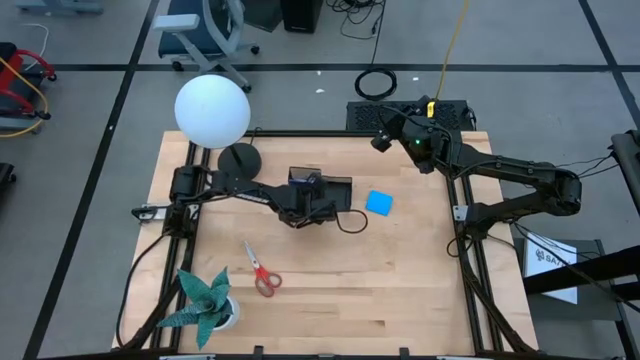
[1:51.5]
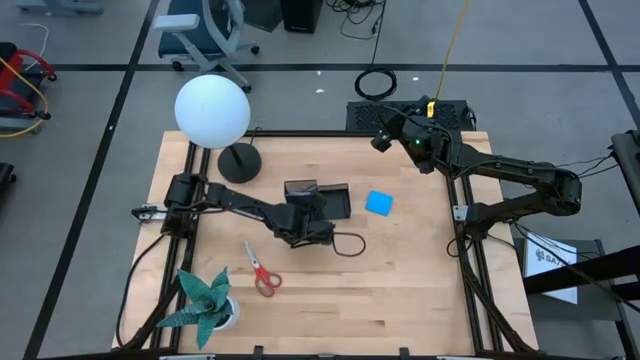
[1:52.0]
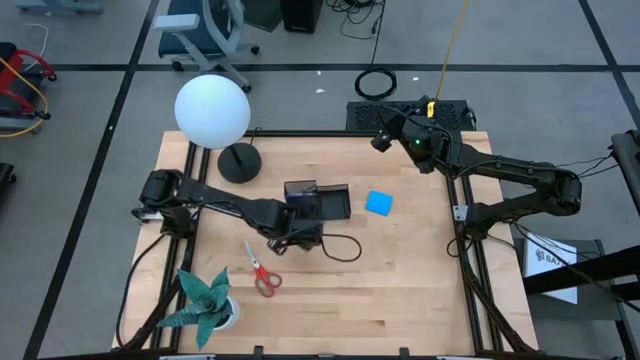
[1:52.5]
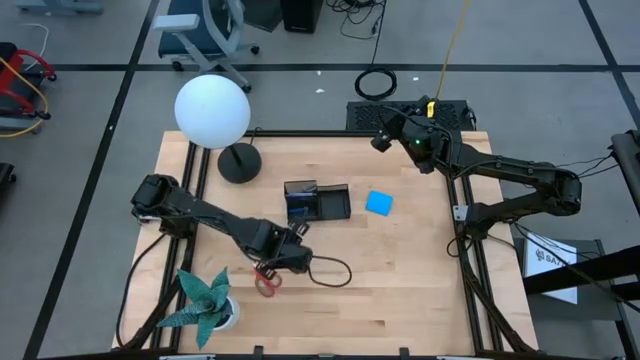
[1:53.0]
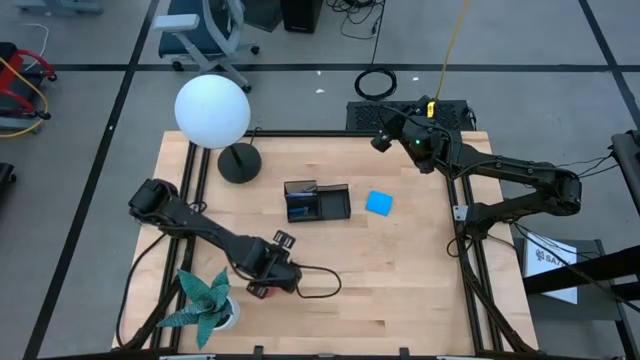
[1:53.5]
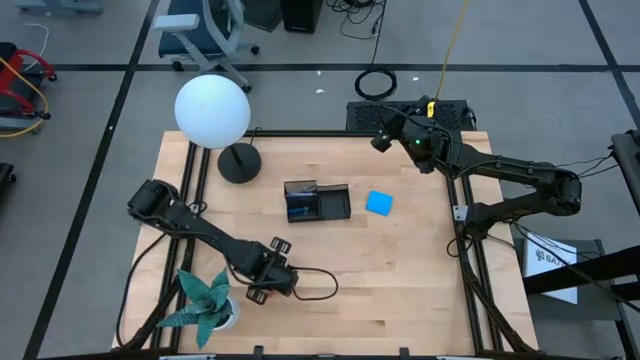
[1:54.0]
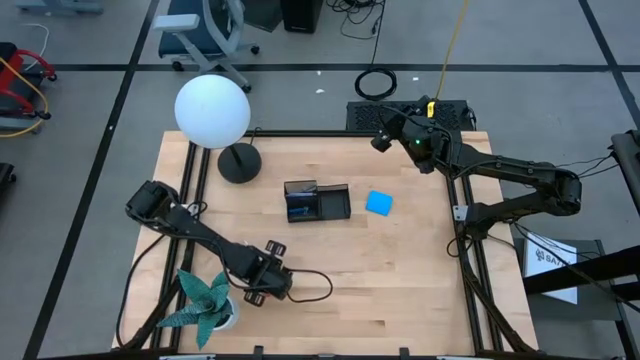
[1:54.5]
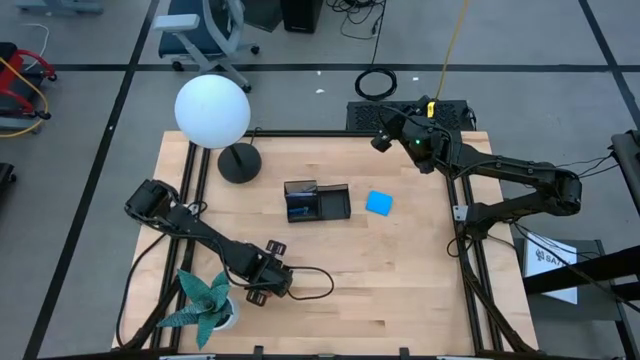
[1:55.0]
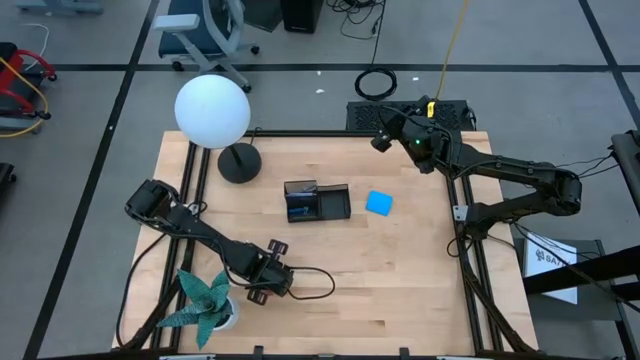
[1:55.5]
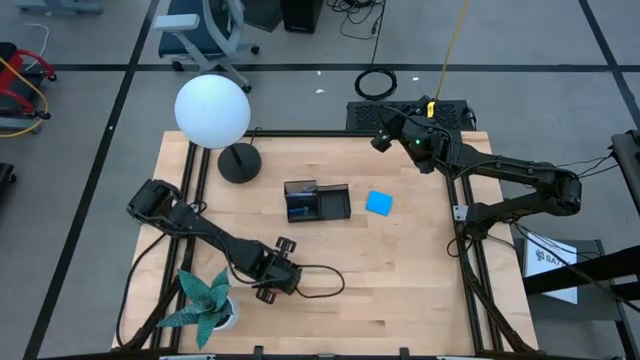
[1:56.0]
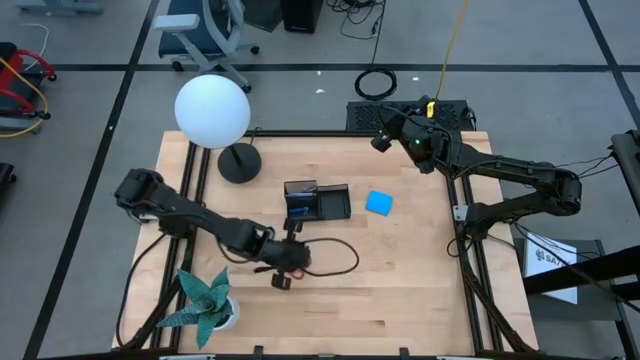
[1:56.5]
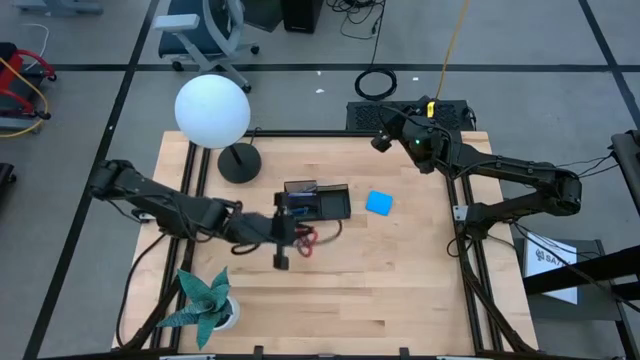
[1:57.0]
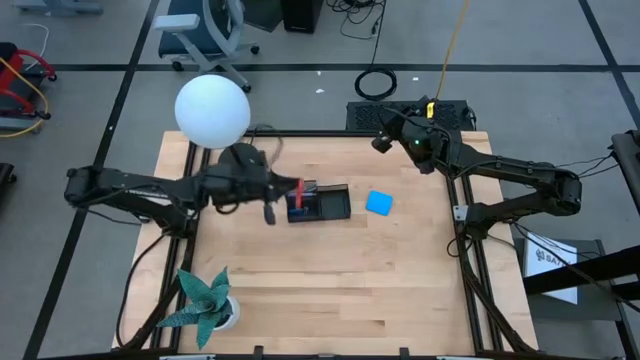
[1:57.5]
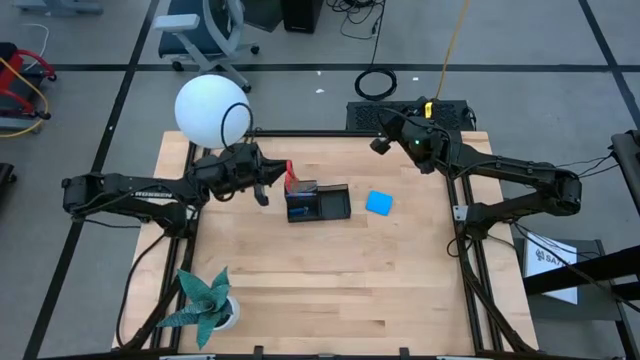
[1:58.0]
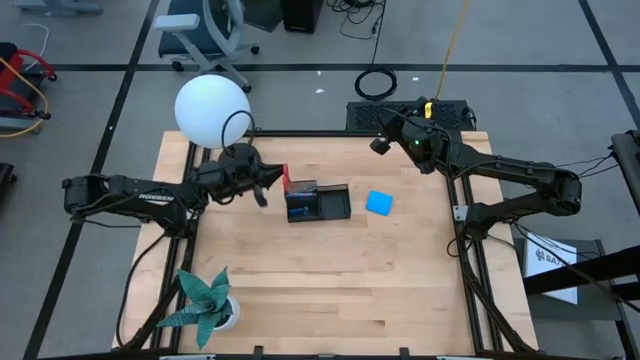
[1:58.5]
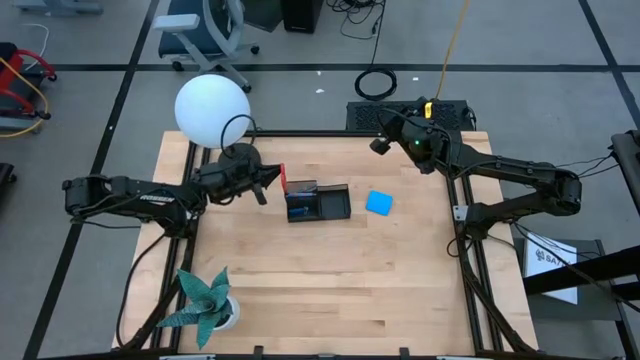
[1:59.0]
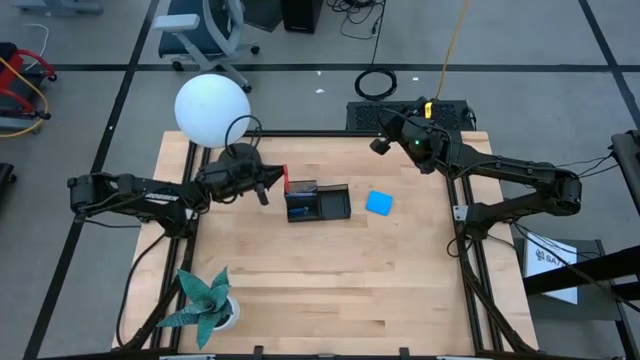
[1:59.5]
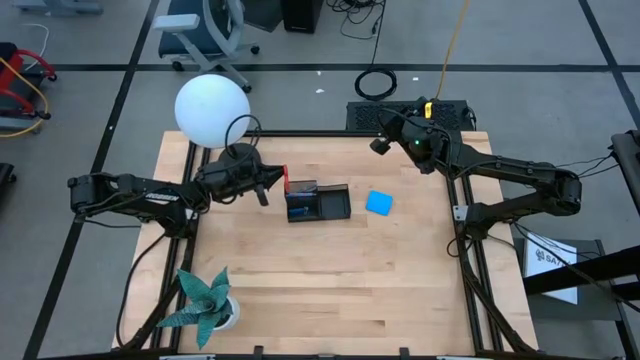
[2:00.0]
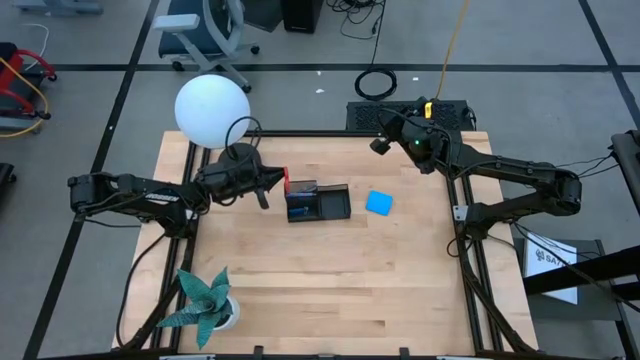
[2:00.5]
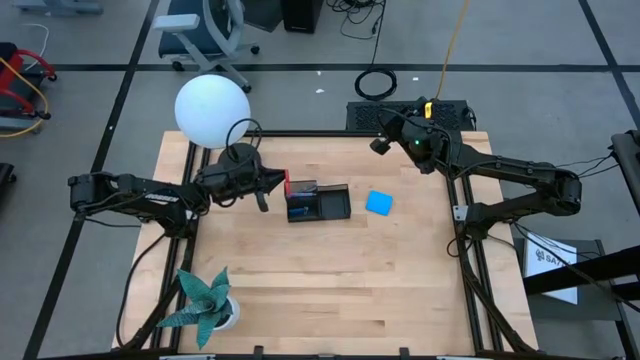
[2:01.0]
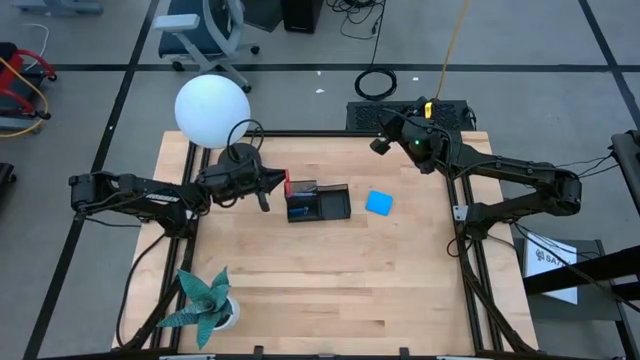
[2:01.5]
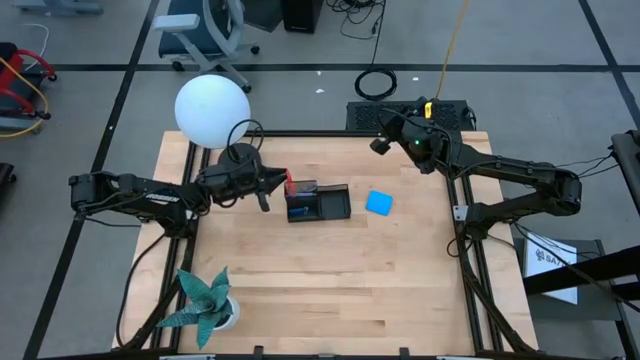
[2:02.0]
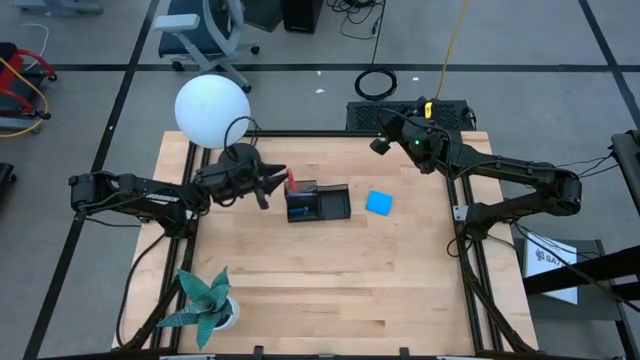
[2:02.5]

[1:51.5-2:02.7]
Task: Pick and place office supplies into organizer
Put the red scissors into the black desk organizer

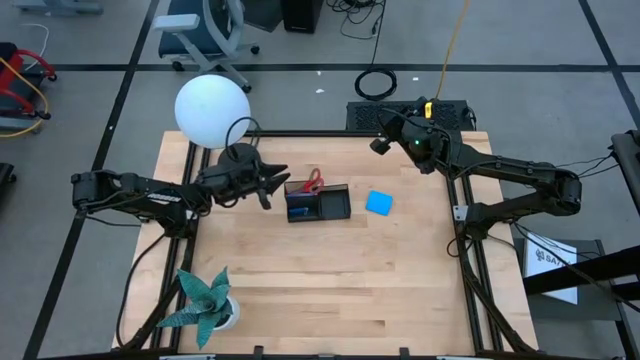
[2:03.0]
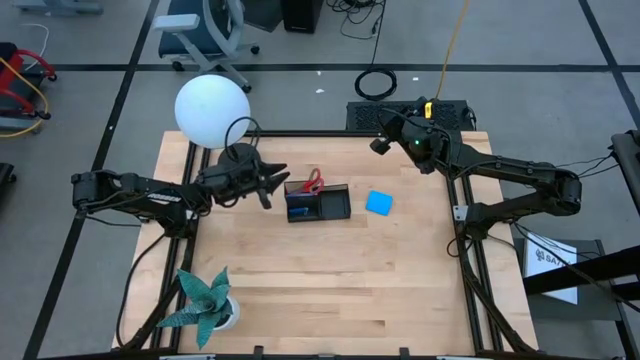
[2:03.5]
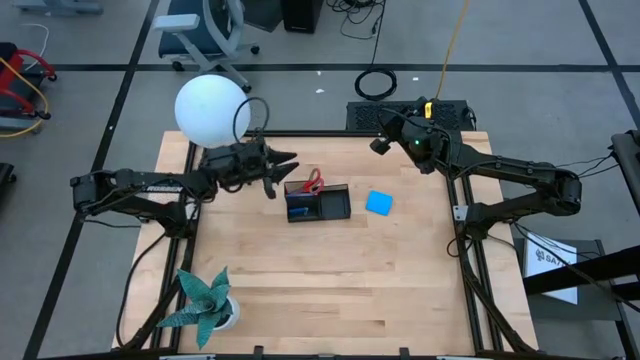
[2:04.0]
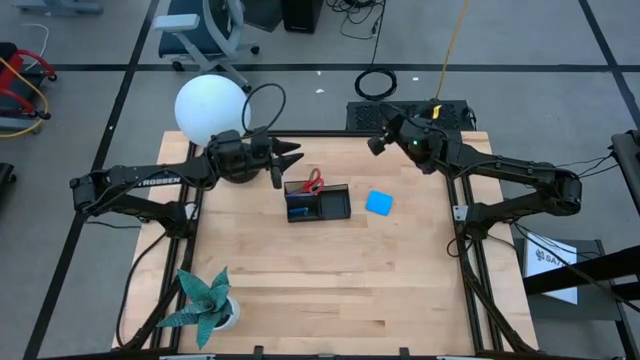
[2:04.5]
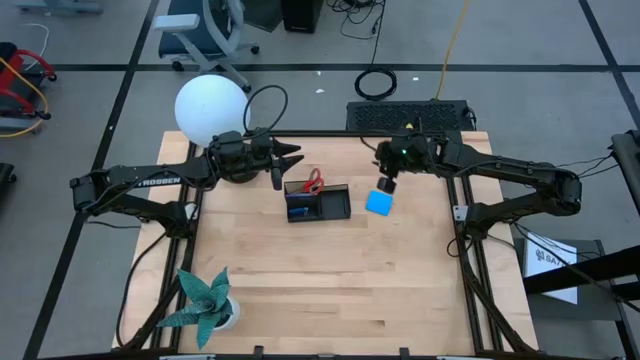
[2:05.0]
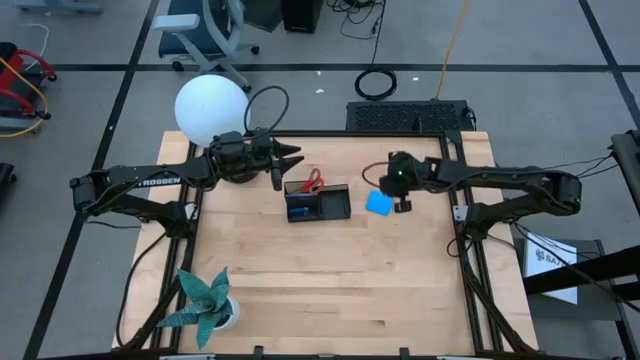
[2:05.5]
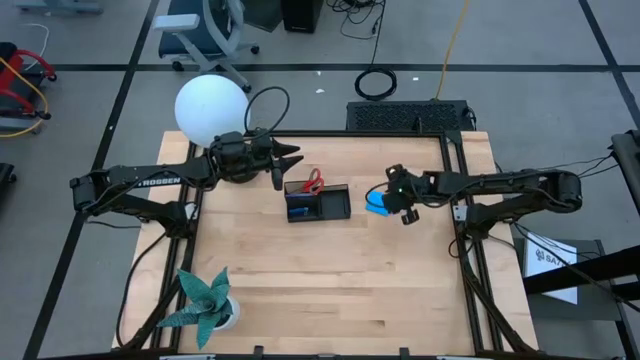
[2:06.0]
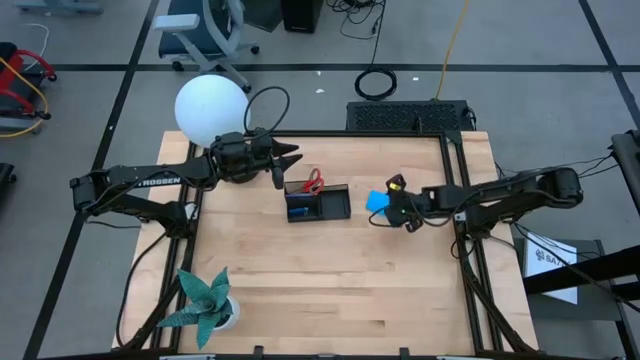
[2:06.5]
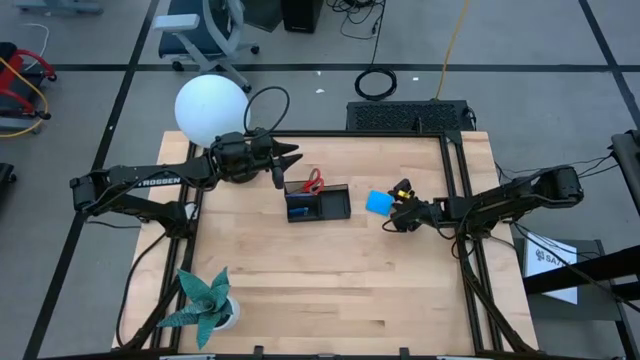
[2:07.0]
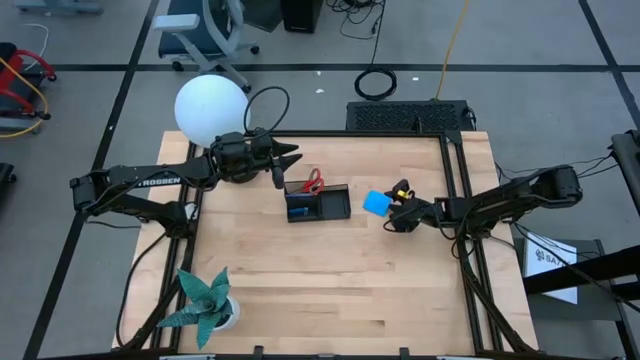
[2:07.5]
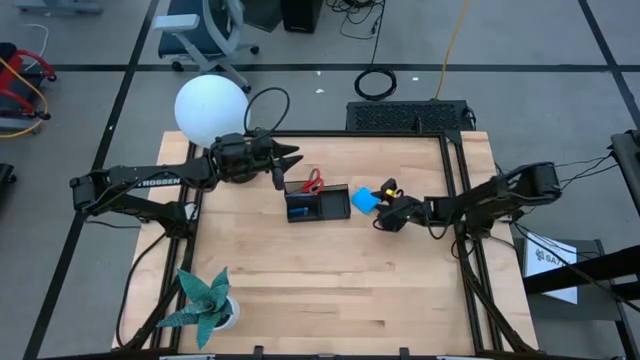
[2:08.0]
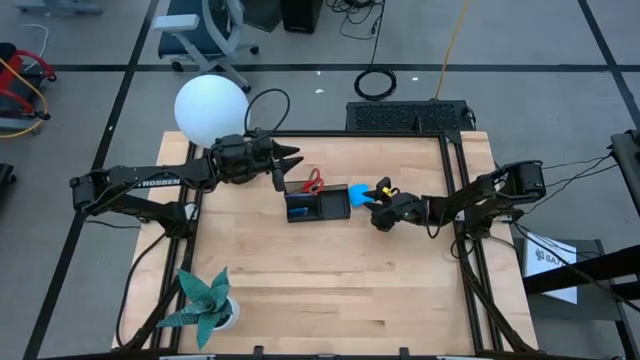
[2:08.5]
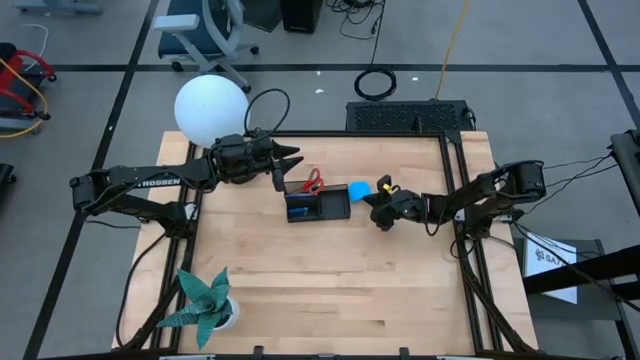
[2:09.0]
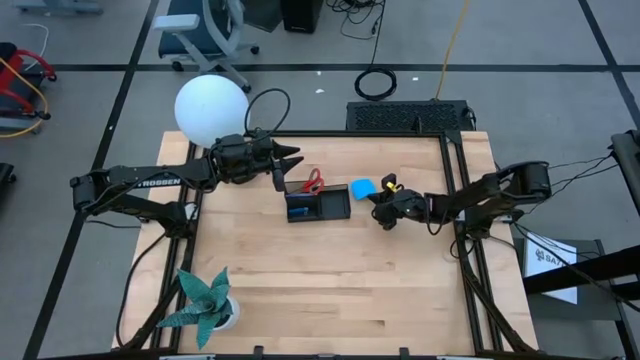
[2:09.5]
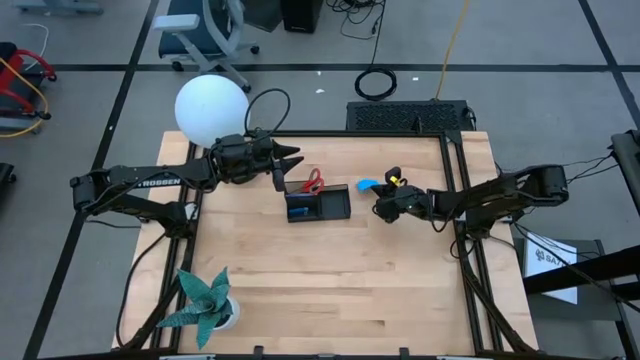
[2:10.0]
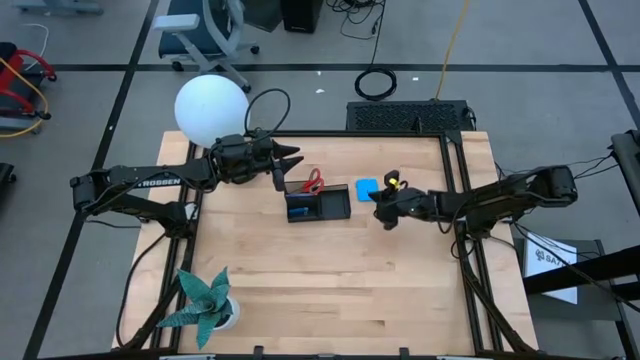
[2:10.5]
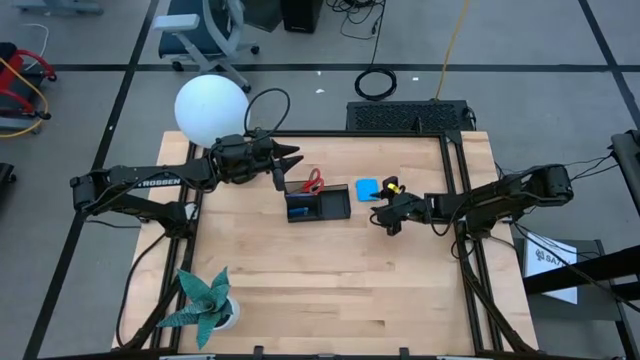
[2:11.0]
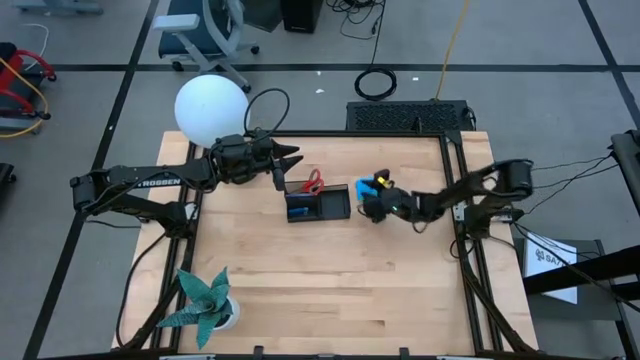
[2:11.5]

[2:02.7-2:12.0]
Put the blue sticky notes into the black desk organizer
